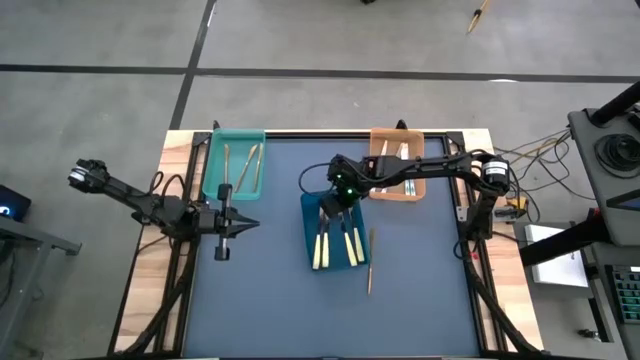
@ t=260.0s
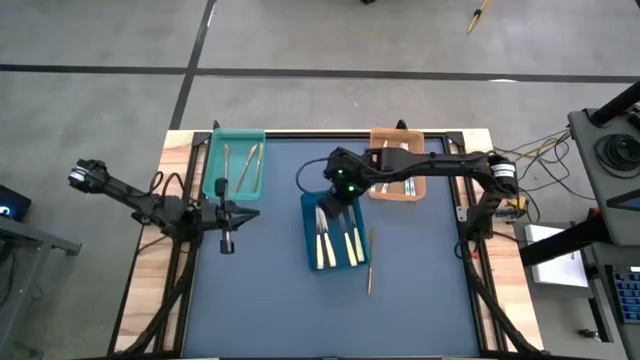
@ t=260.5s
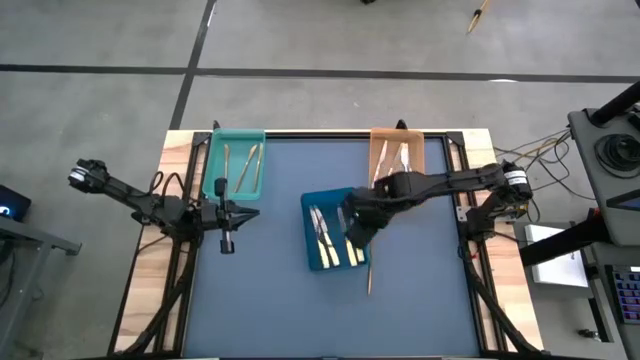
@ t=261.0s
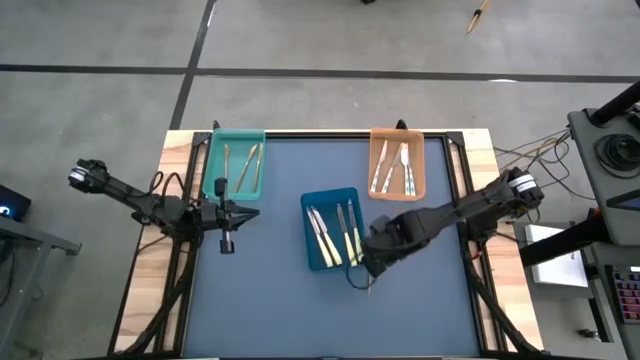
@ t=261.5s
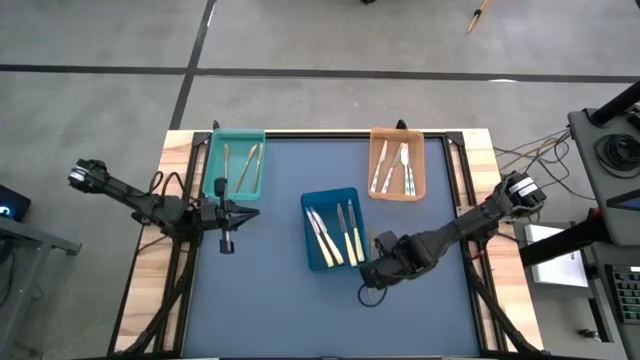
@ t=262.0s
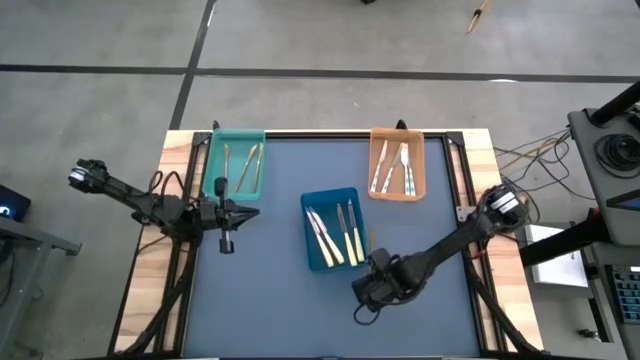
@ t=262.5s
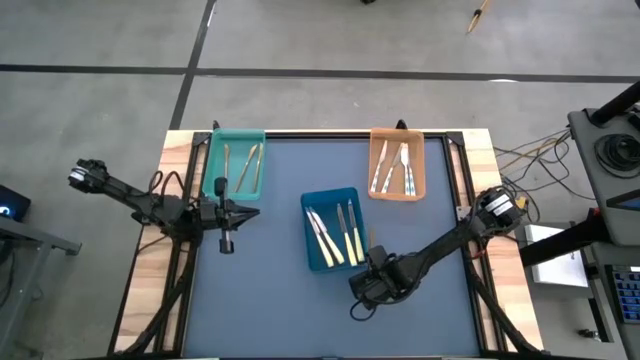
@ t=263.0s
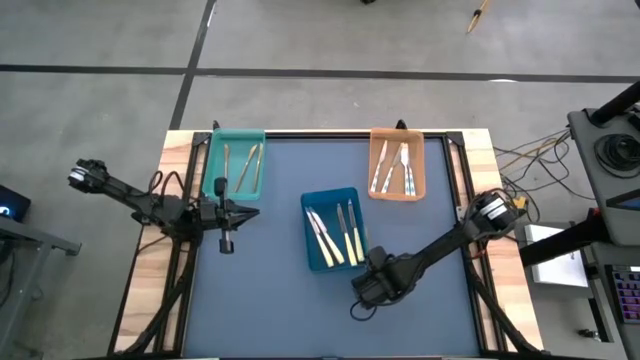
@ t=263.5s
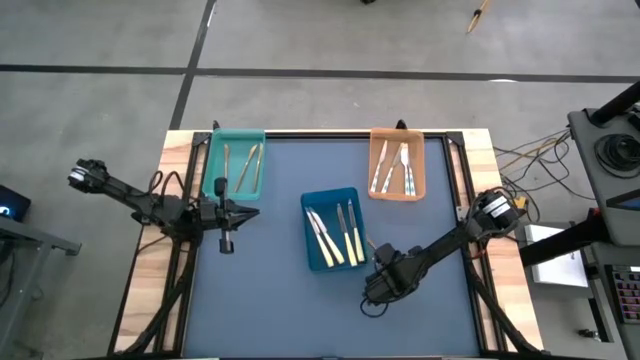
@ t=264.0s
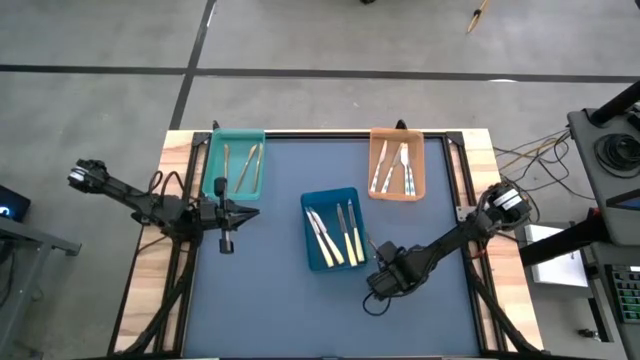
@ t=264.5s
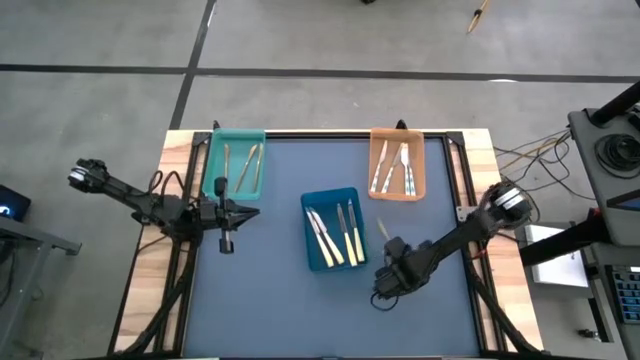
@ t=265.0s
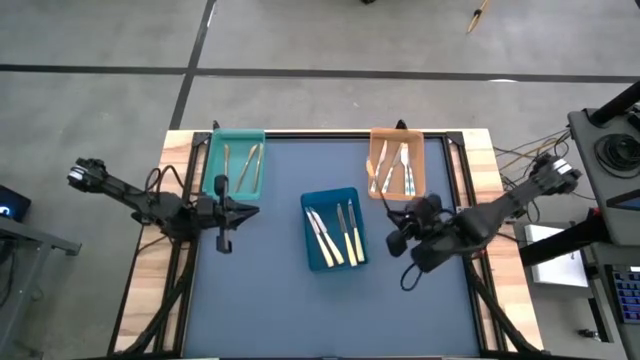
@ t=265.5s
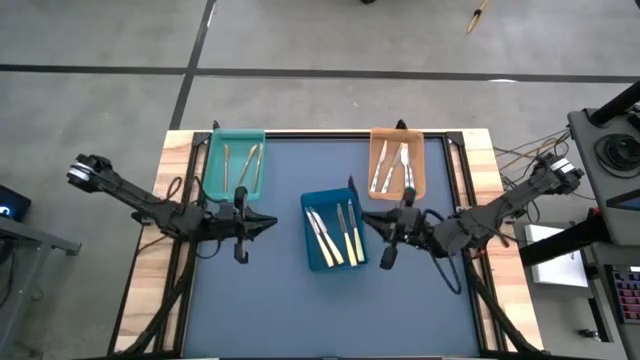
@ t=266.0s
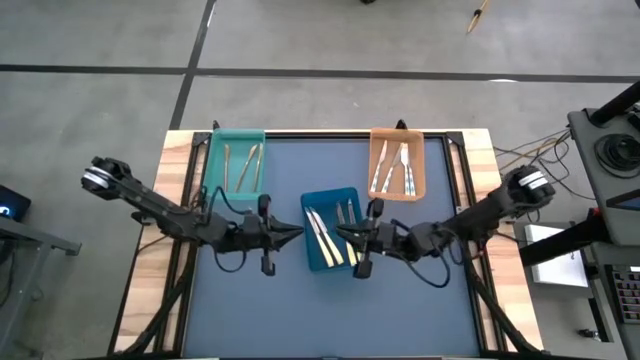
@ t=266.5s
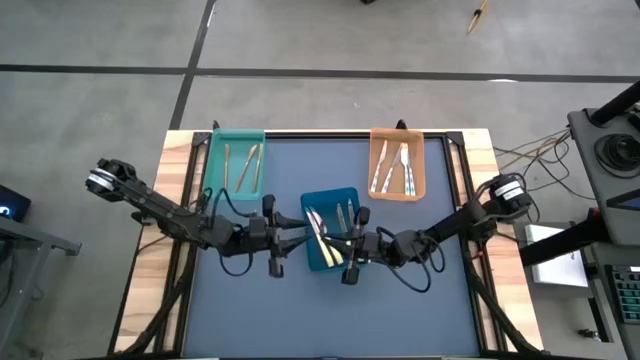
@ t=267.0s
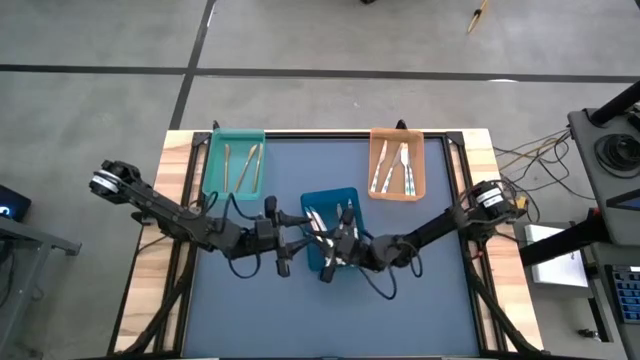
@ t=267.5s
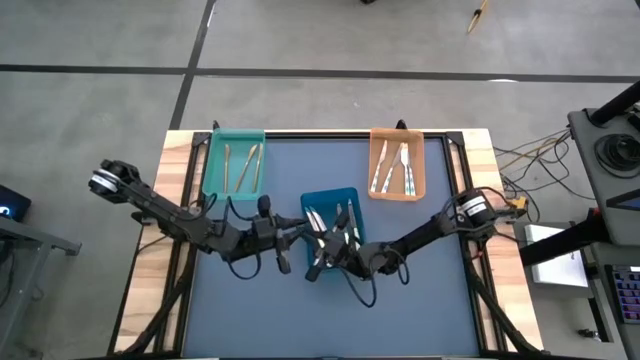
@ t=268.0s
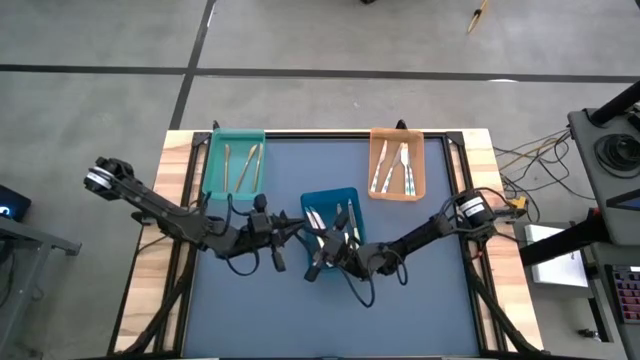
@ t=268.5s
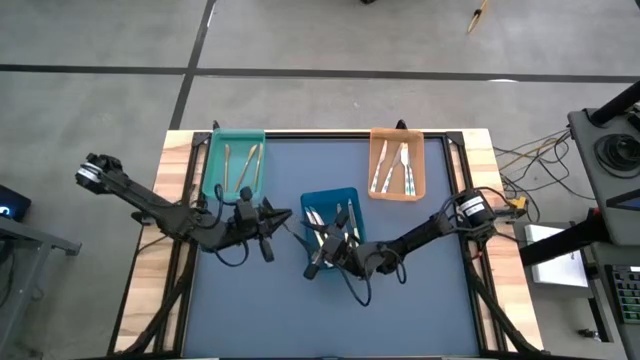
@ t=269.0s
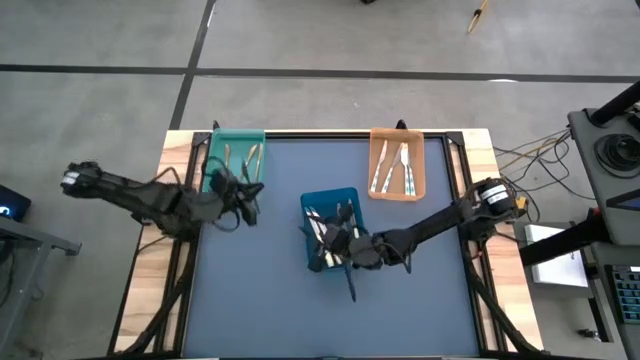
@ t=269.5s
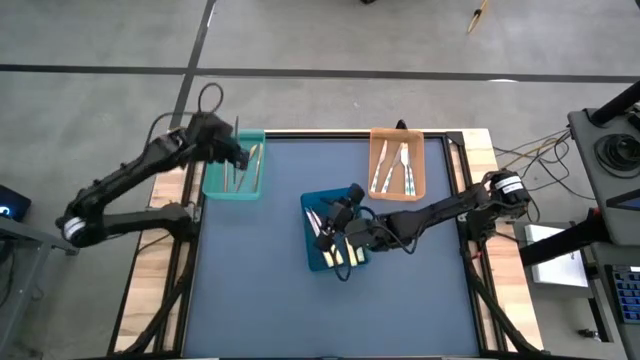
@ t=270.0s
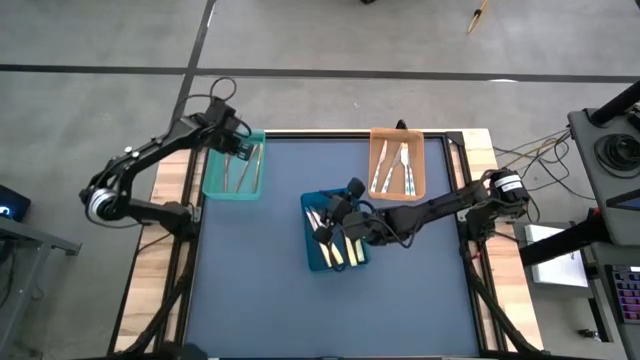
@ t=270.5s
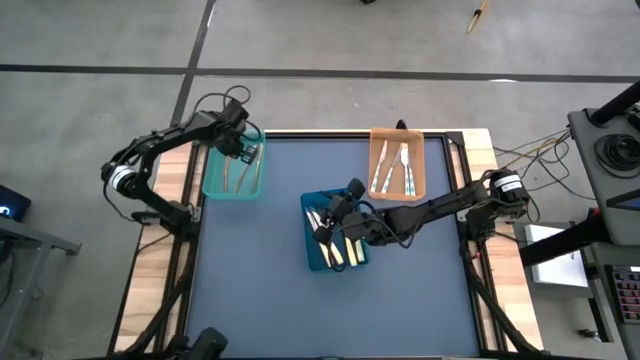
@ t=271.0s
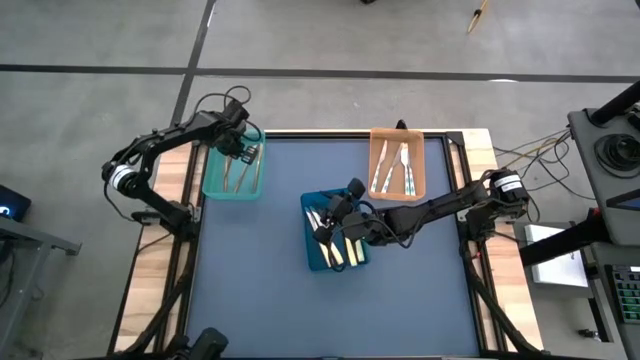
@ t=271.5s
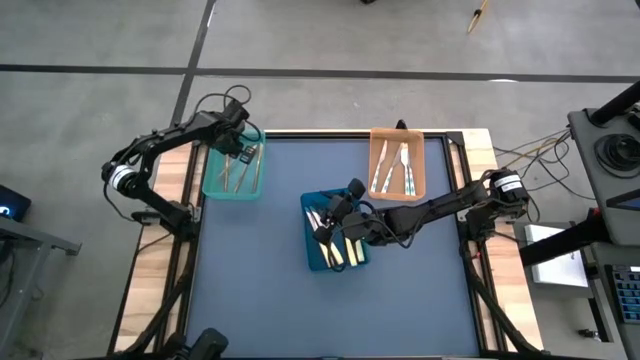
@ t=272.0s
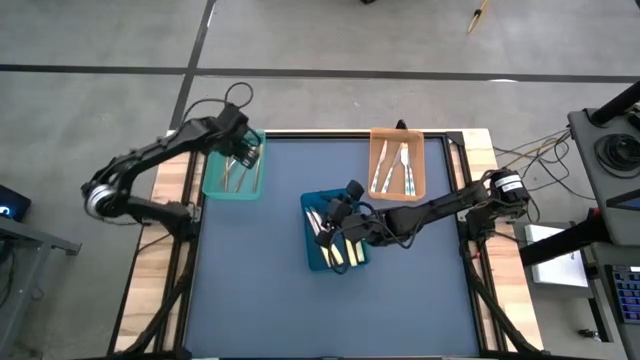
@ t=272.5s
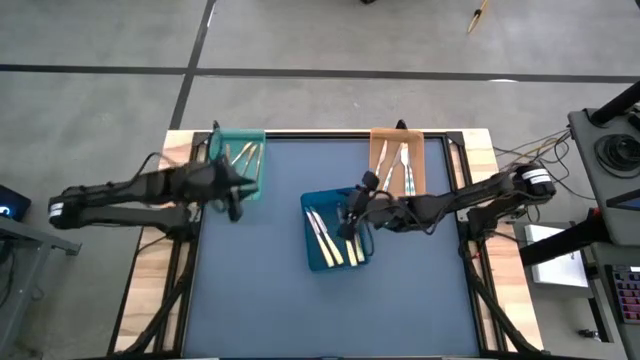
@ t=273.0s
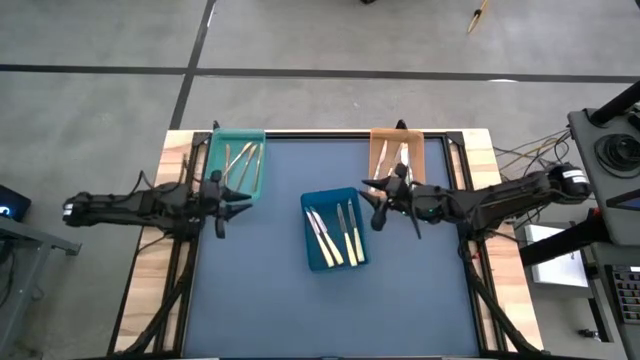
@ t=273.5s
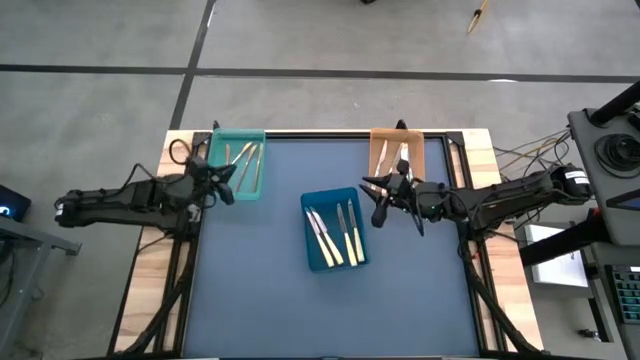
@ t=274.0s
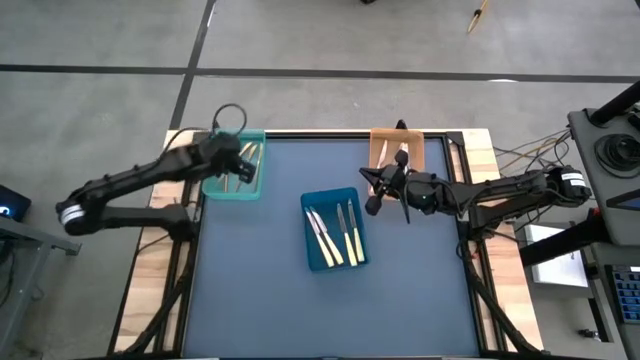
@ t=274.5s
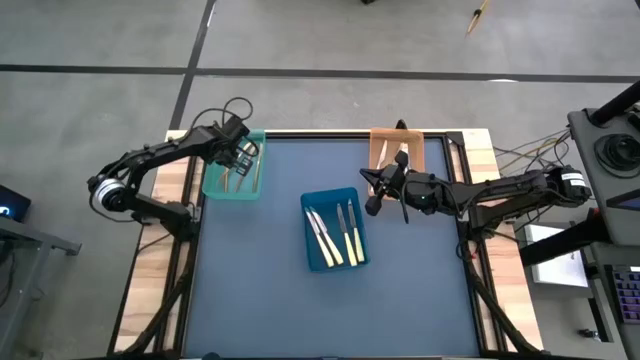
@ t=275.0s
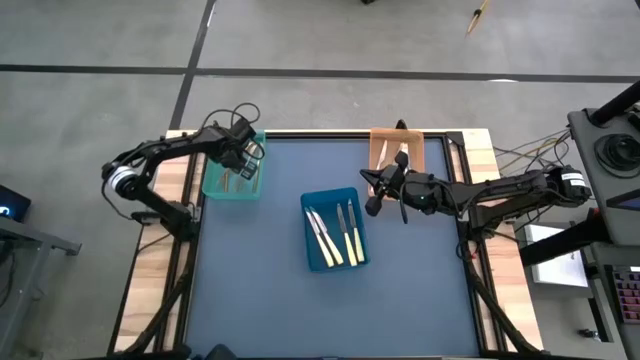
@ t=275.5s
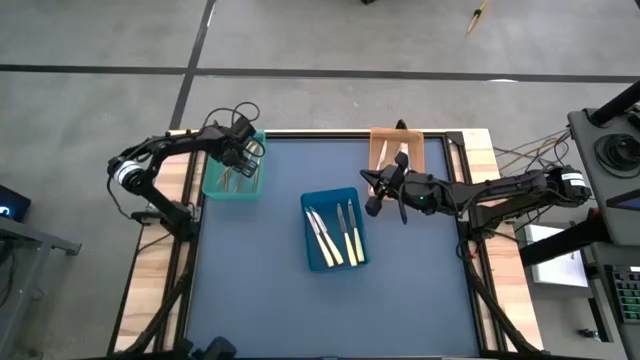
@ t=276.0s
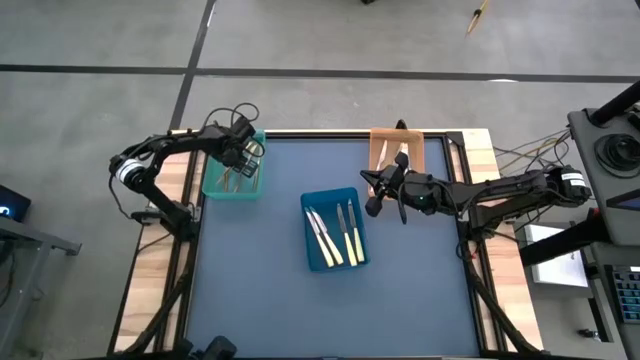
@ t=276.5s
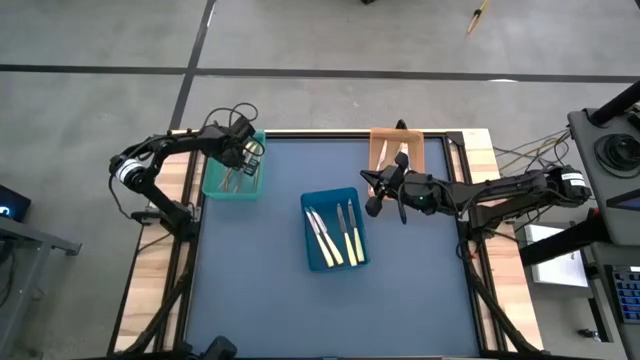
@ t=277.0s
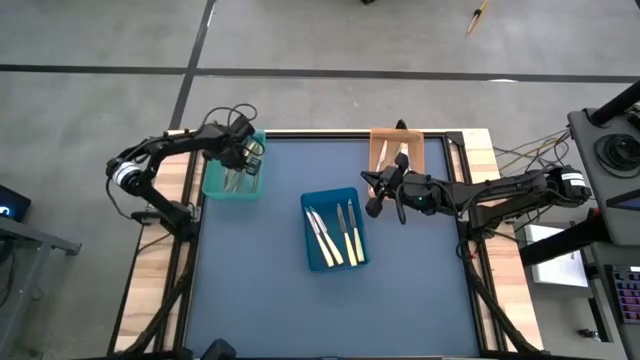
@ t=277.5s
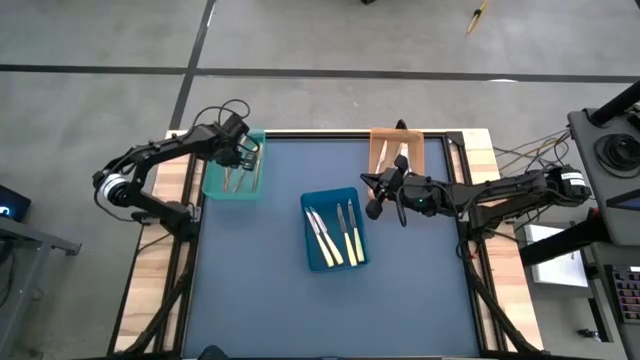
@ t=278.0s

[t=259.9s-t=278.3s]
Task: Sort silverware by color (type)
Put the gold knife into the light blue bin

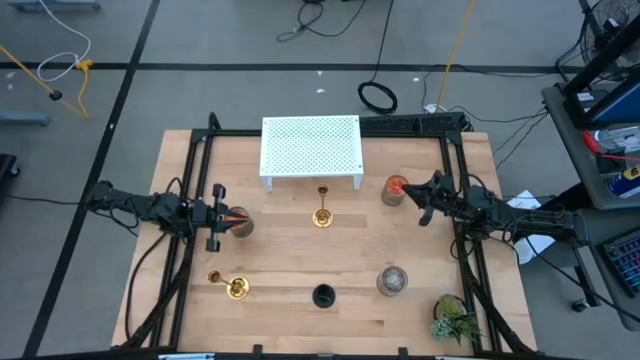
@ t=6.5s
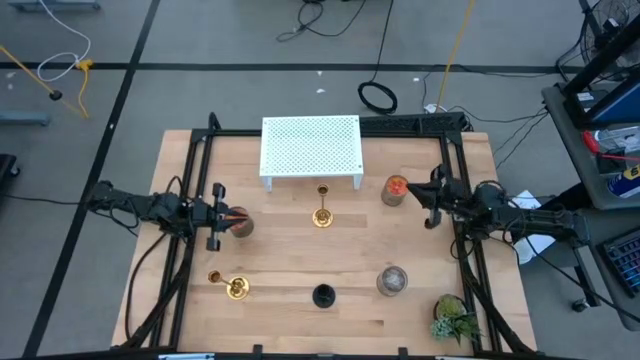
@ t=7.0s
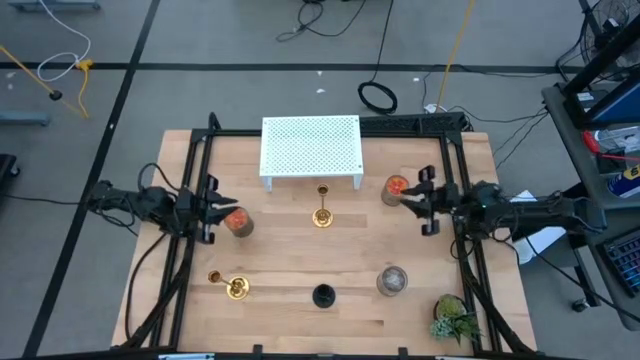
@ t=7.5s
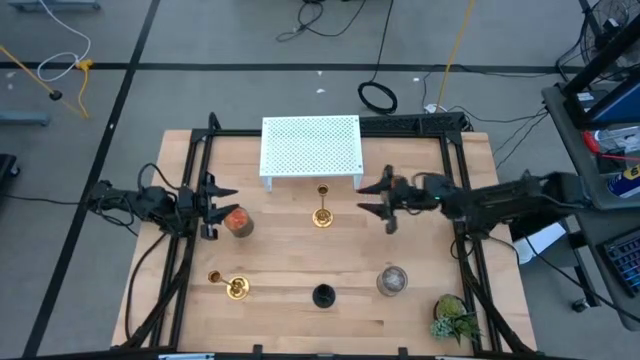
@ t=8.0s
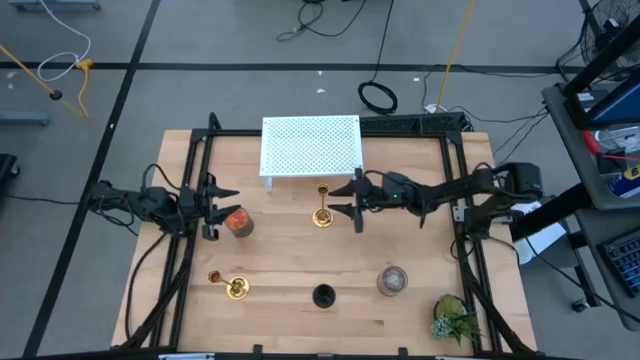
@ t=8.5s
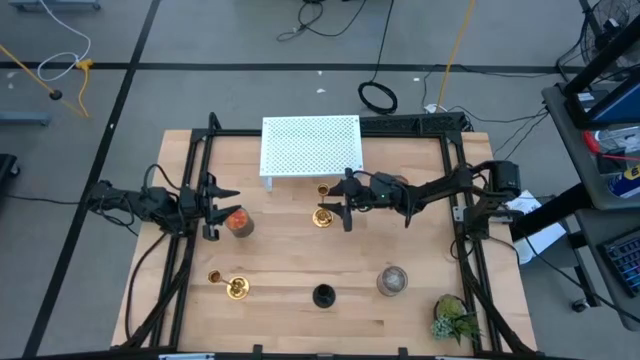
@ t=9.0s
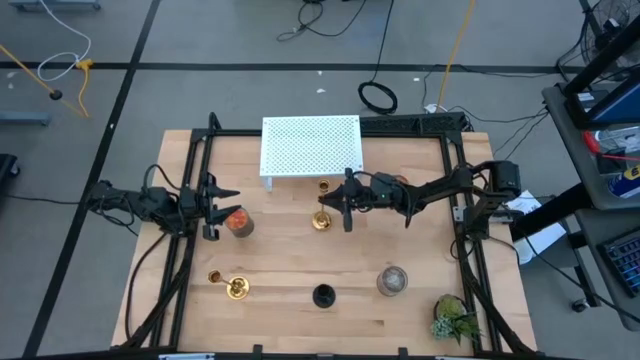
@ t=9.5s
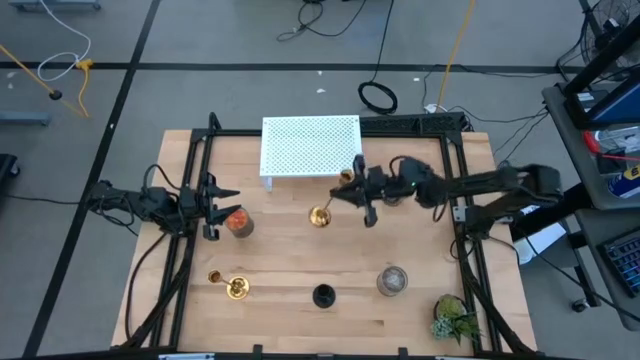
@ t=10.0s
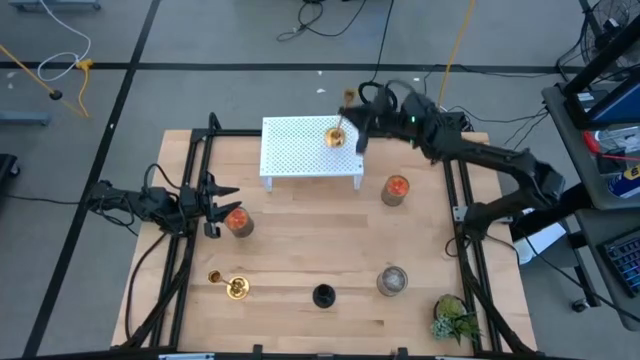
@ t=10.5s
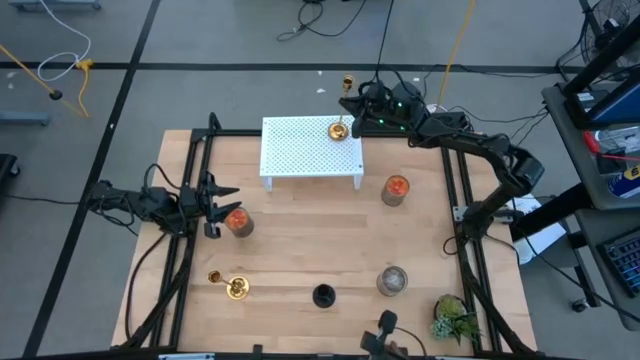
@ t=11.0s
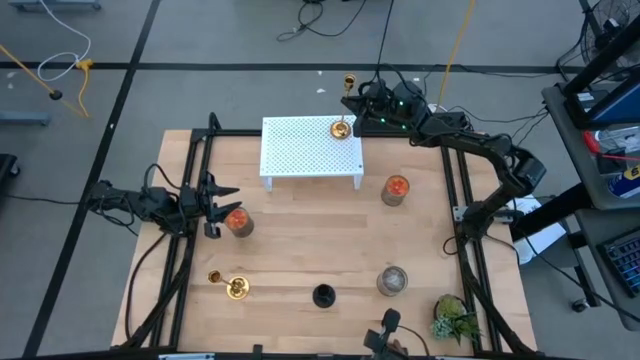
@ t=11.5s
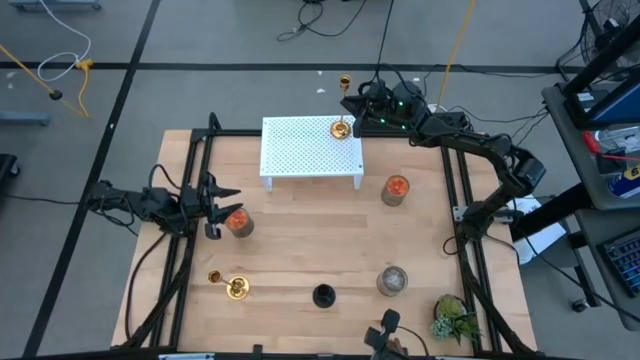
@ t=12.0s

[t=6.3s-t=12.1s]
Task: Pick & Place candle stick holders
Put the top gold candleholder on the shelf
